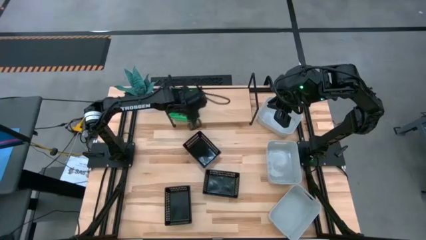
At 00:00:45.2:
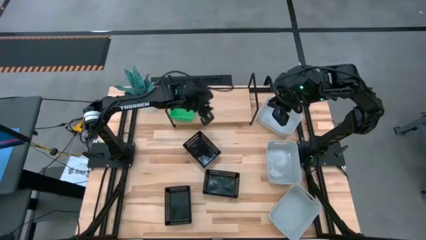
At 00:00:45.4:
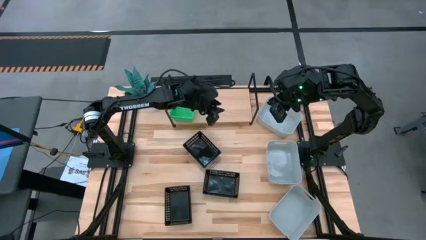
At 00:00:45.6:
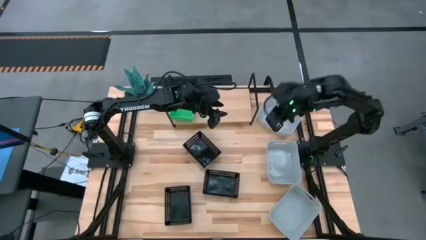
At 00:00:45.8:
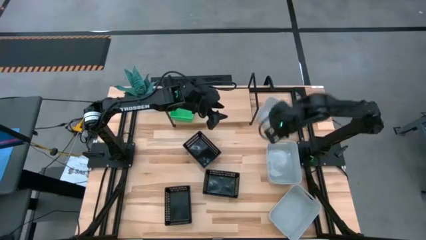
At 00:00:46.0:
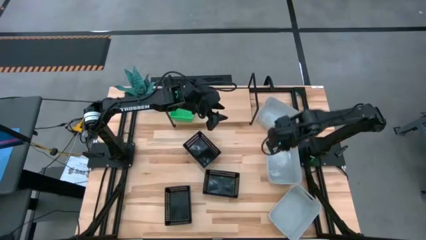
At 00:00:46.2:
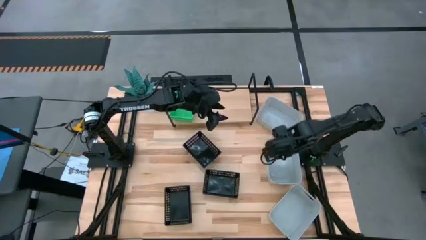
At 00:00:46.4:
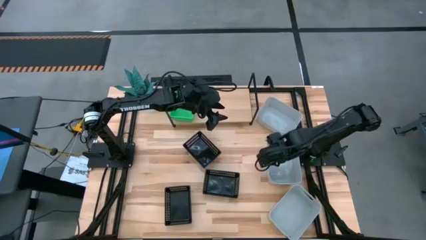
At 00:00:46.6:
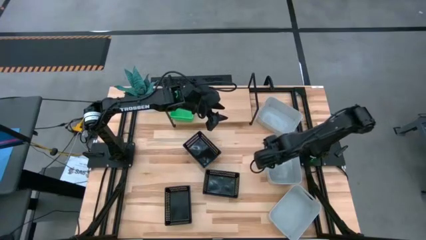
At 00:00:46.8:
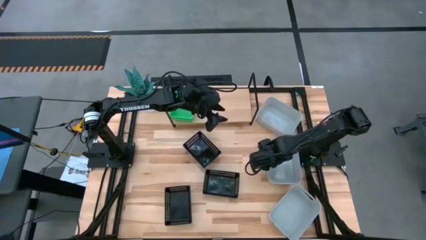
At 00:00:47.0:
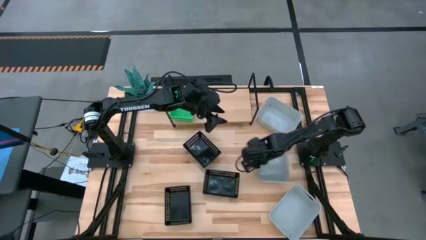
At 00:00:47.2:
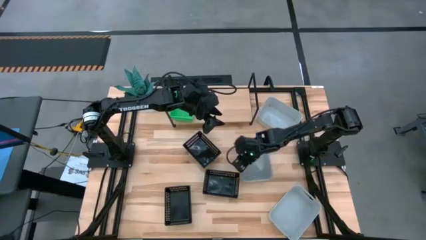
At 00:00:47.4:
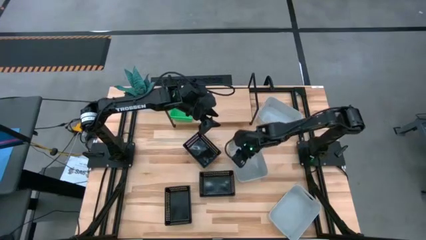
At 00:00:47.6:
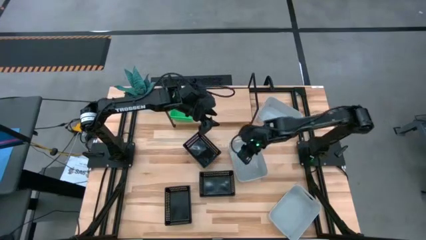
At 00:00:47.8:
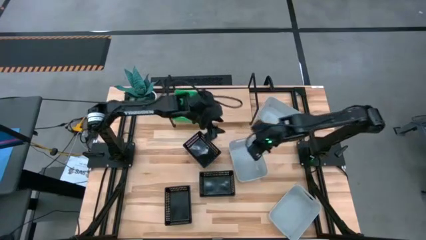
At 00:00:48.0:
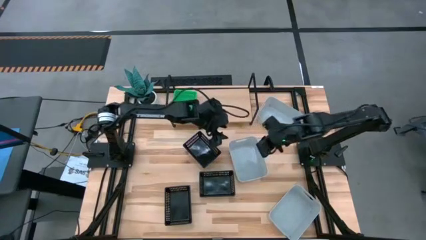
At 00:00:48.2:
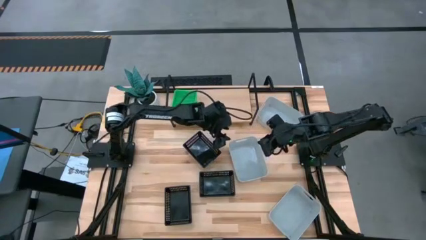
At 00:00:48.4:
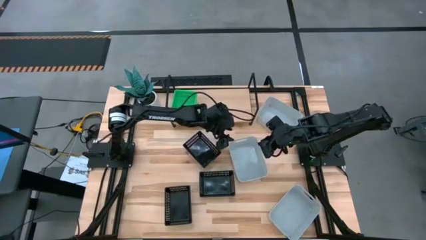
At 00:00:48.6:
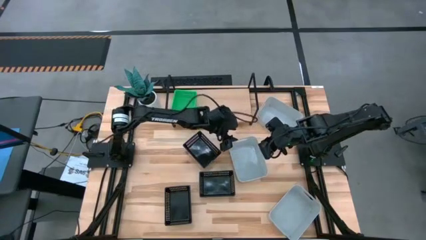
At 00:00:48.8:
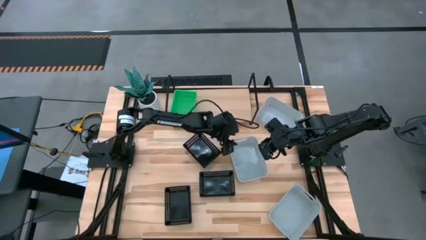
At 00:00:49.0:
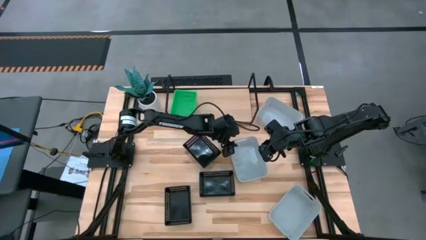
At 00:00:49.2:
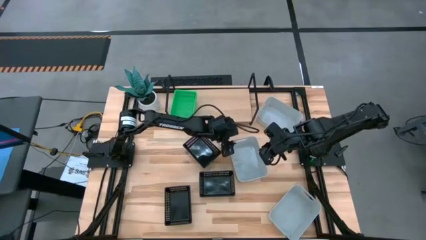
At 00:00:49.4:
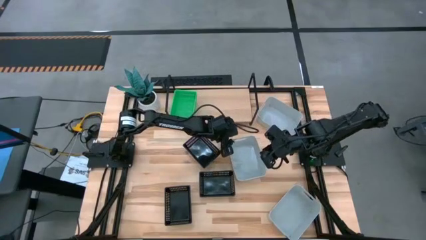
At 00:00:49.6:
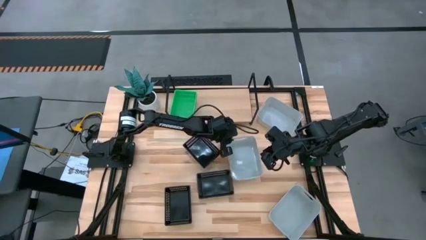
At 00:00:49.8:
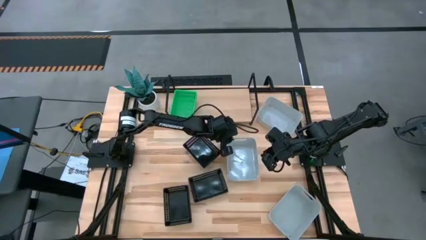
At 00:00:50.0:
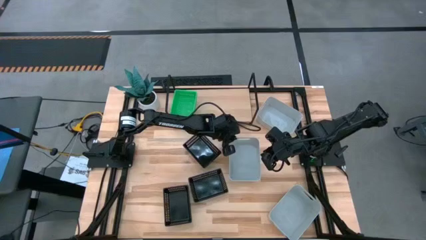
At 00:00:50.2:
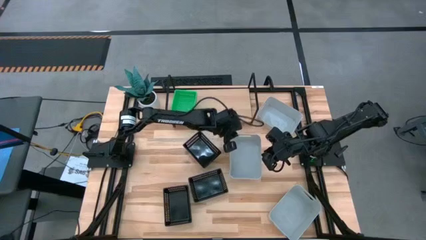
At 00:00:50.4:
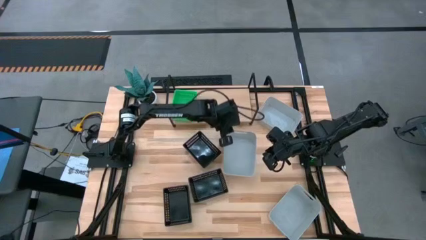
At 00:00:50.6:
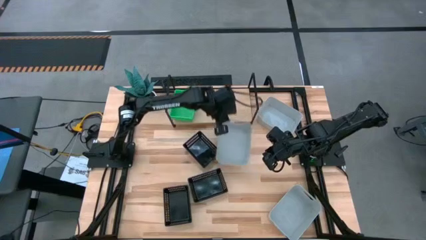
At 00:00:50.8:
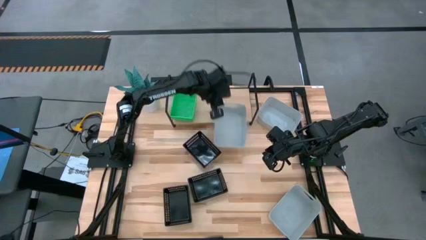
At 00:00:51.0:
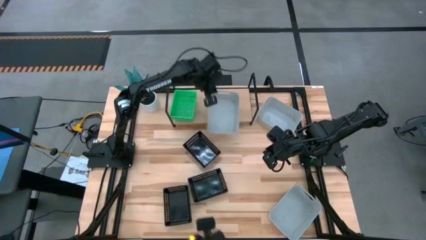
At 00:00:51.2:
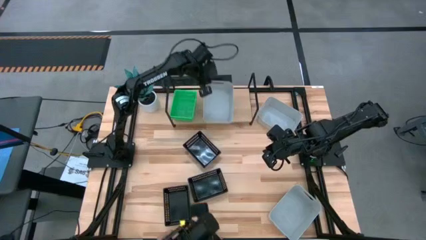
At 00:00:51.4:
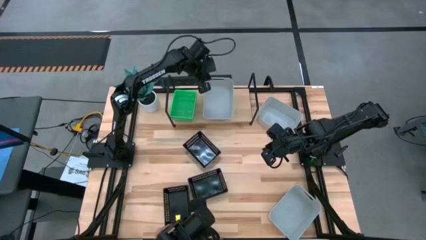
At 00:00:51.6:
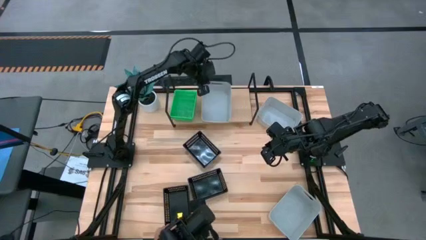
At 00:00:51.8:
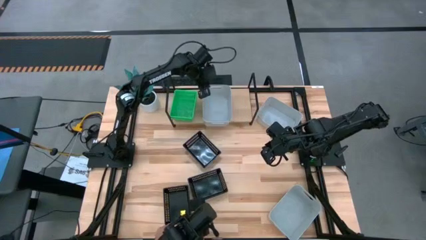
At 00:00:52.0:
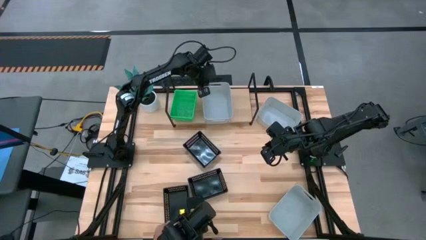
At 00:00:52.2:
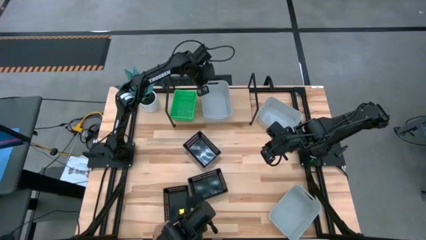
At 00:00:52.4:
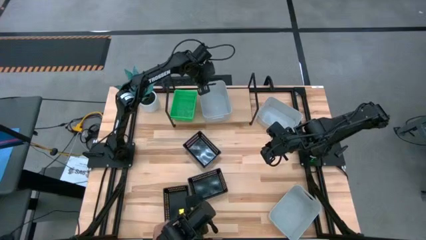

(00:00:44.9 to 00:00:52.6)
Task: Stack baskets on shelf by color
Put the left gray bin on the shelf

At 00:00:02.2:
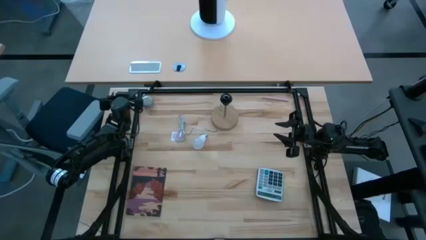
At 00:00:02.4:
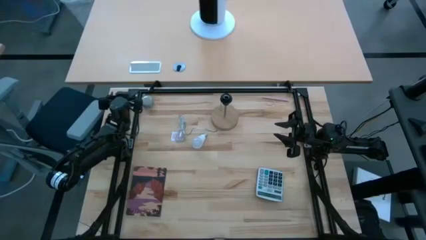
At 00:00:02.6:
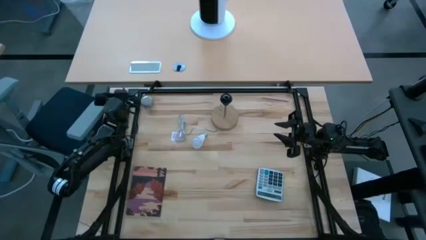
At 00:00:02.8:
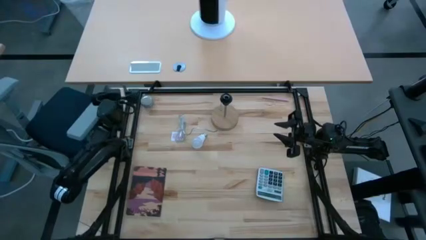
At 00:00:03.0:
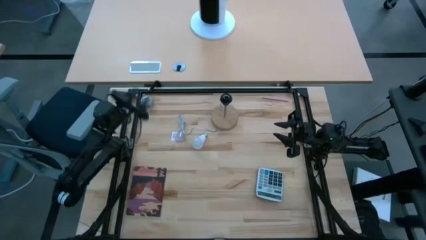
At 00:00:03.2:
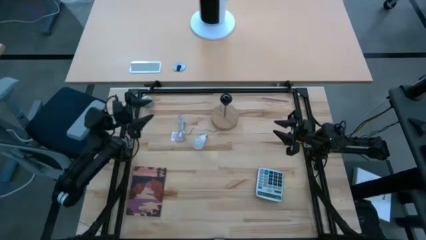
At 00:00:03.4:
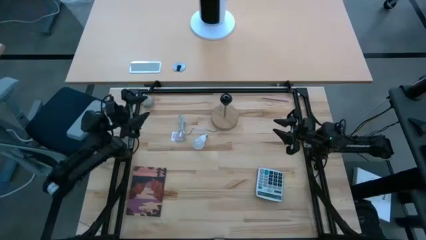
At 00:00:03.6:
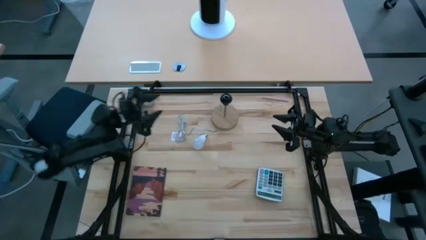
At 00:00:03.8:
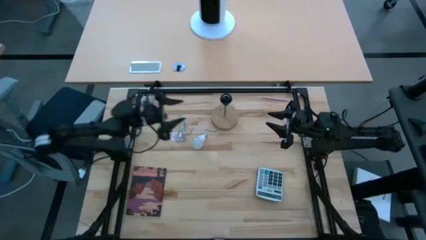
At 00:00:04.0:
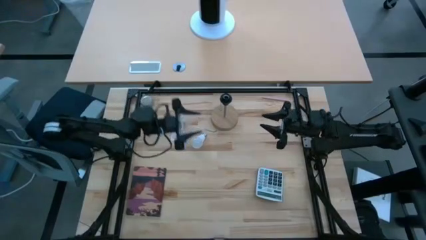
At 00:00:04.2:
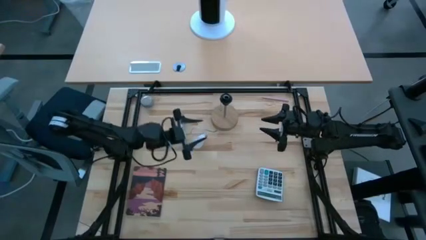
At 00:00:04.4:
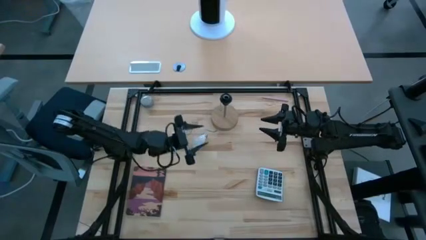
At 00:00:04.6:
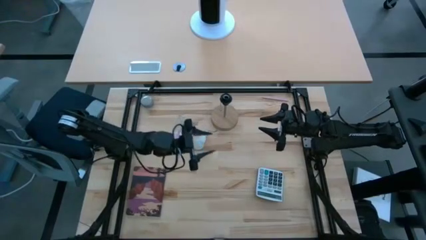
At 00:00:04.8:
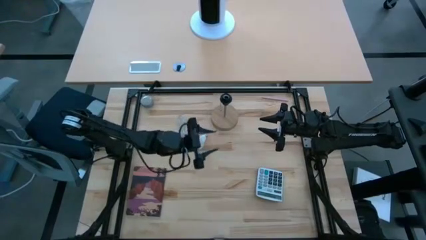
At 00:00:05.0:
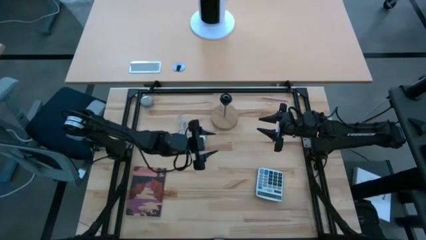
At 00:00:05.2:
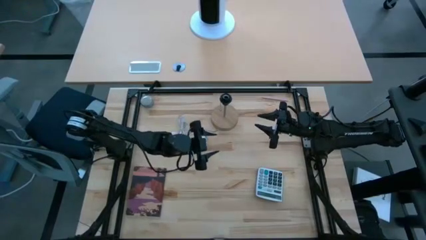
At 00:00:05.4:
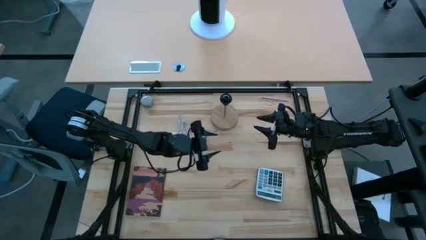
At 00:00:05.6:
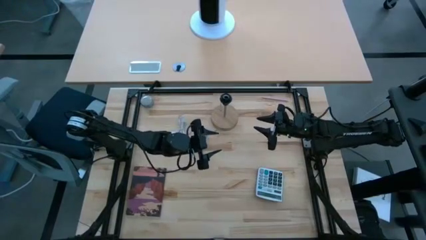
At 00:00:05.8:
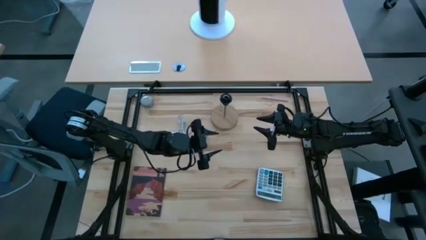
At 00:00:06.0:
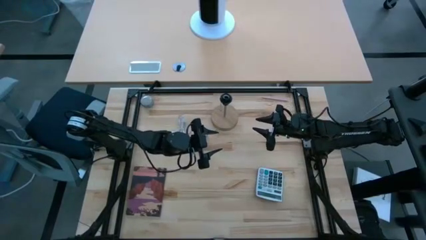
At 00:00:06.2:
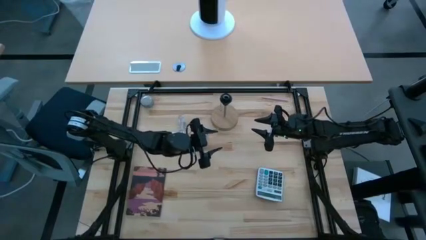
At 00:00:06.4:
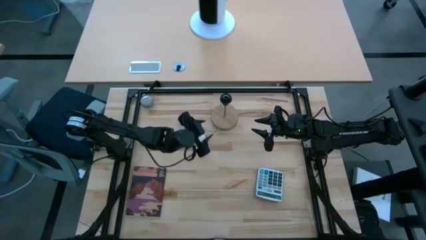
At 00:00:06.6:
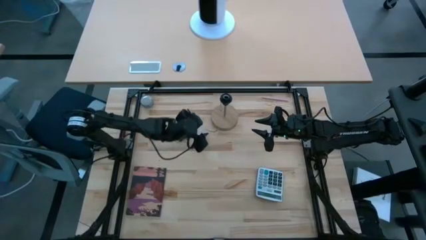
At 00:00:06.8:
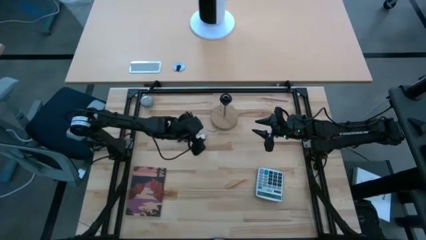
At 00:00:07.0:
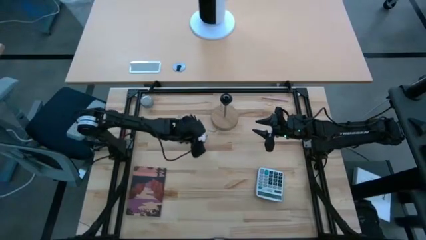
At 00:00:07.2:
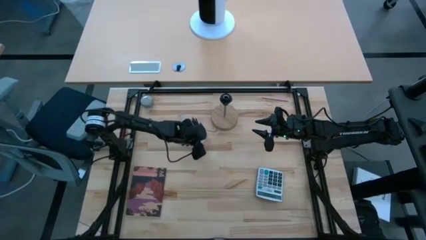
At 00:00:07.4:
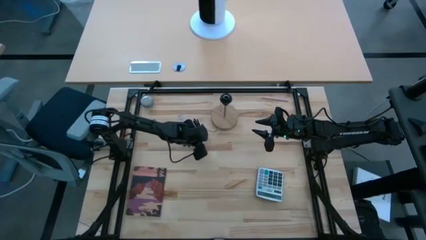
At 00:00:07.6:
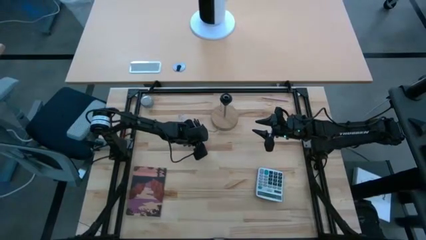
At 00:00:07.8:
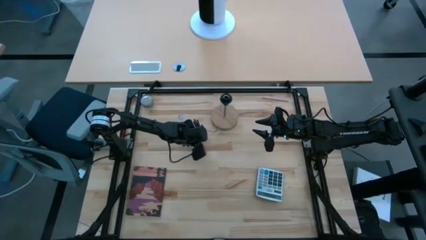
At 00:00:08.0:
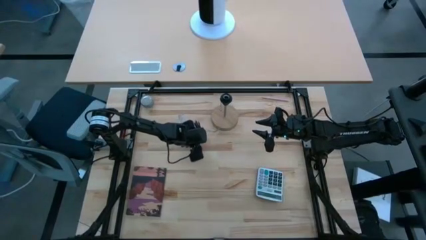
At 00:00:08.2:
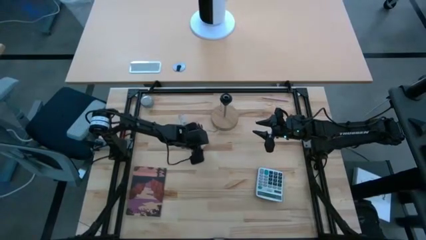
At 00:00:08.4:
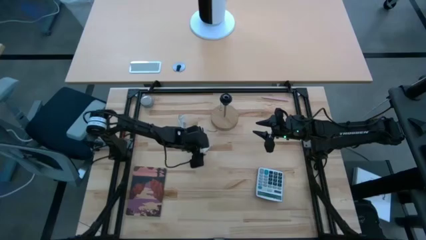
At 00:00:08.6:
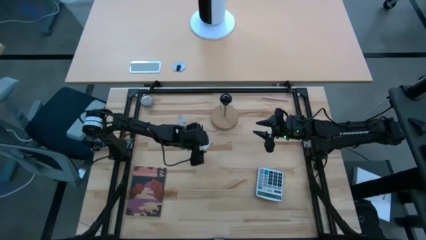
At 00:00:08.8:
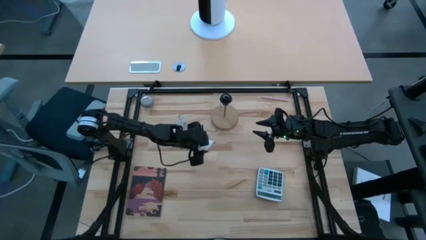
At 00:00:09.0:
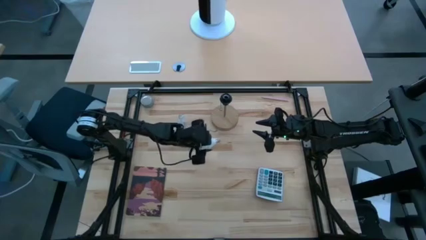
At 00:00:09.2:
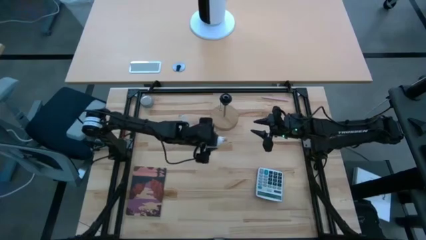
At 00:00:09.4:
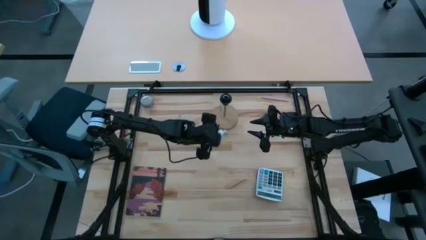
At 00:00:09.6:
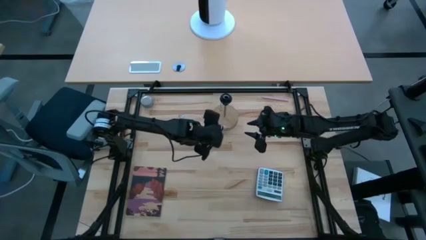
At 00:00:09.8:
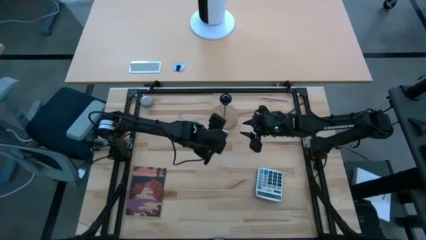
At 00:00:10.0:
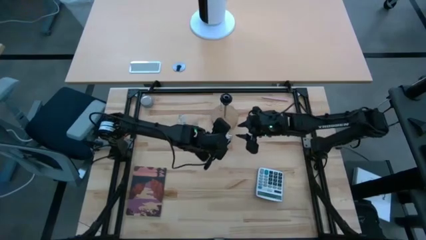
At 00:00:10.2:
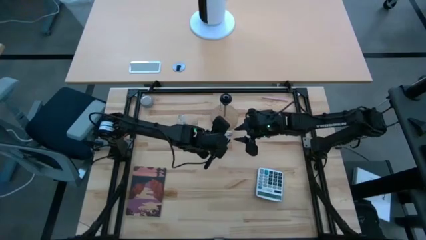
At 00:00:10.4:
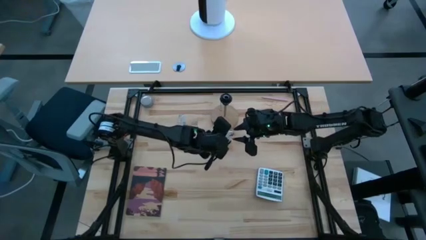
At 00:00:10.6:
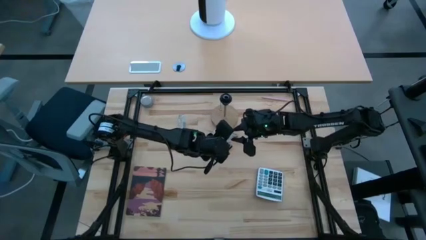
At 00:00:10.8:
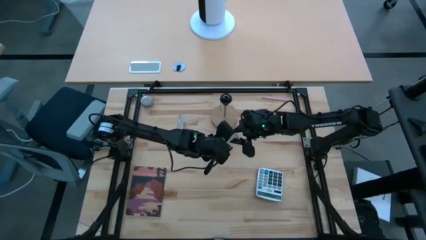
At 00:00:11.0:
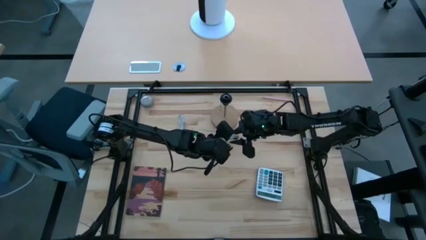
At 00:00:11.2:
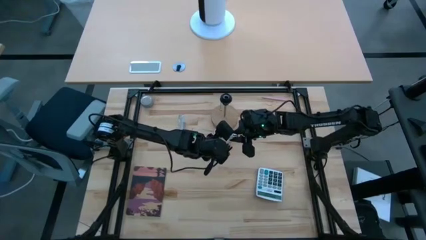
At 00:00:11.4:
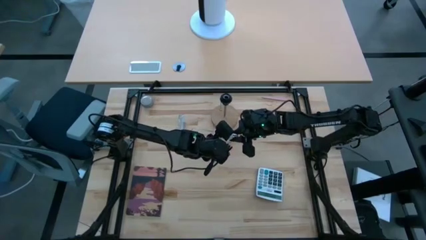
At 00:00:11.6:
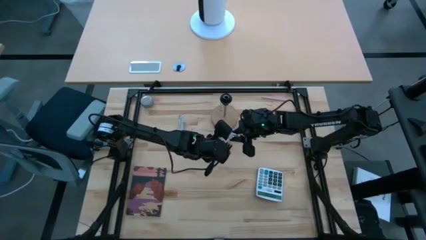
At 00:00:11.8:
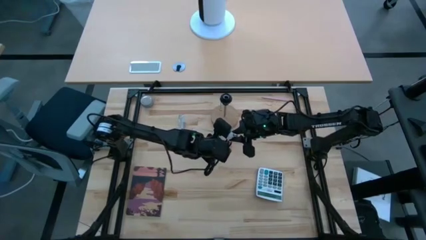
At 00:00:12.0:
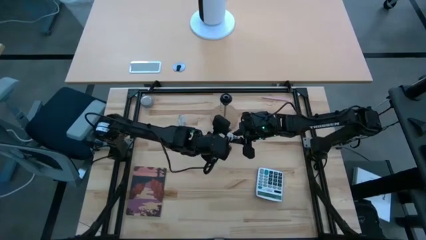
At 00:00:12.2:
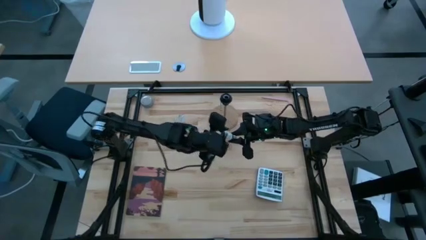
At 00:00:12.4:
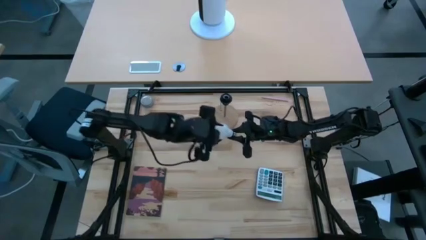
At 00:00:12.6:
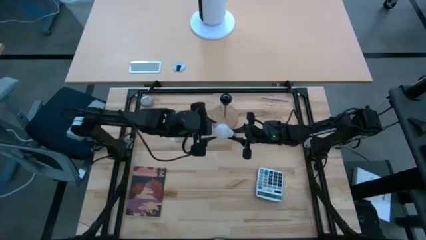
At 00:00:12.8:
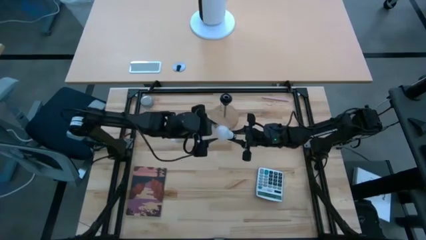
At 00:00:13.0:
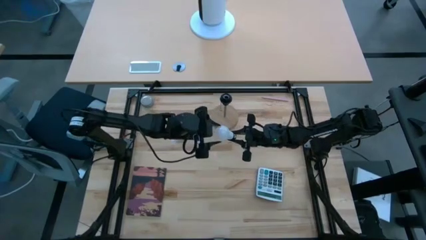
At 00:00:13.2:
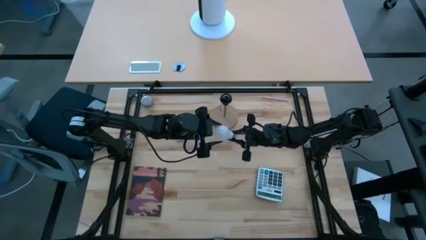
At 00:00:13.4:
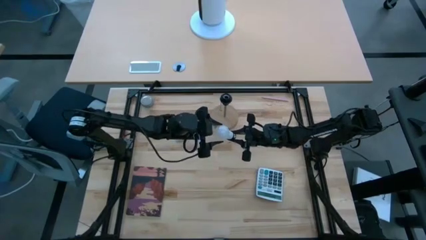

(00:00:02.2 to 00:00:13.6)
Task: Screw lightbulb
Insert the lightbulb into the lamp
